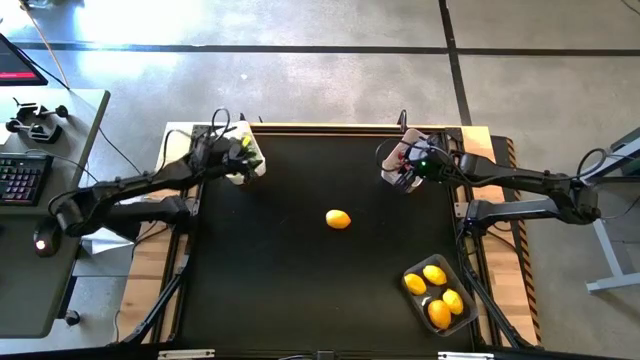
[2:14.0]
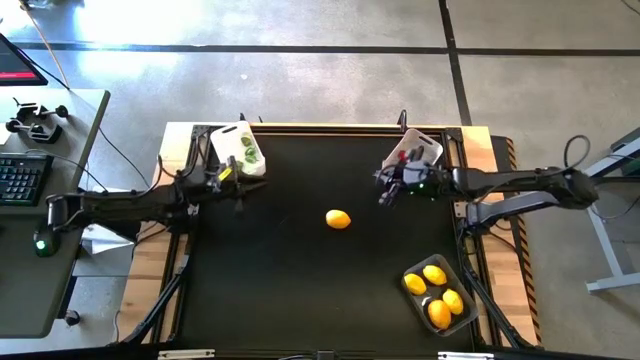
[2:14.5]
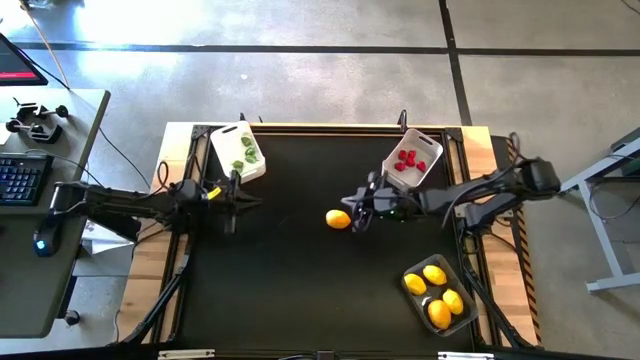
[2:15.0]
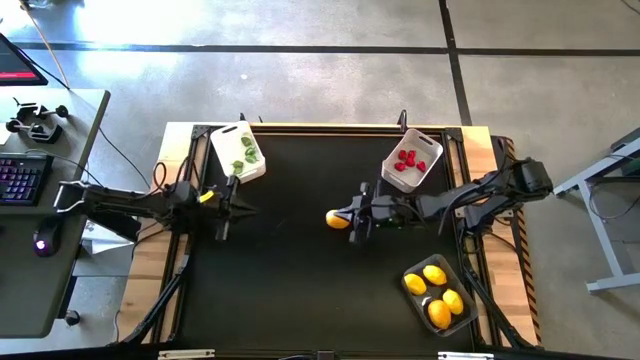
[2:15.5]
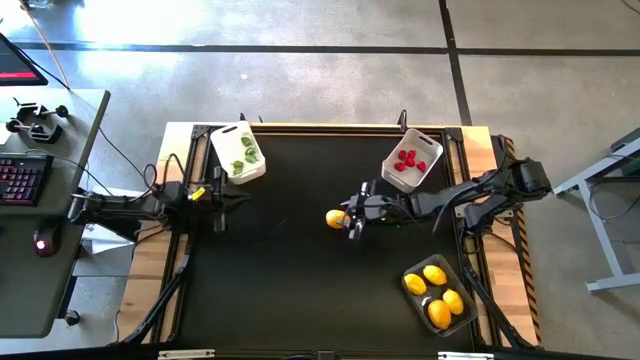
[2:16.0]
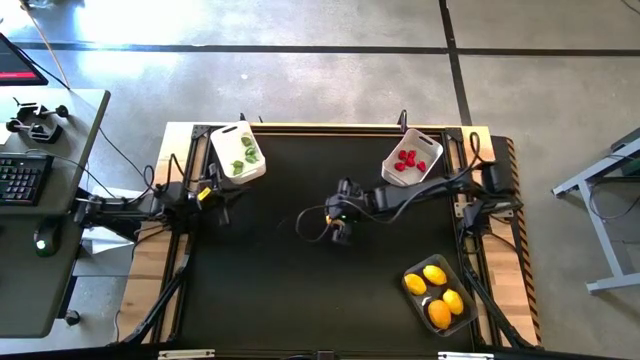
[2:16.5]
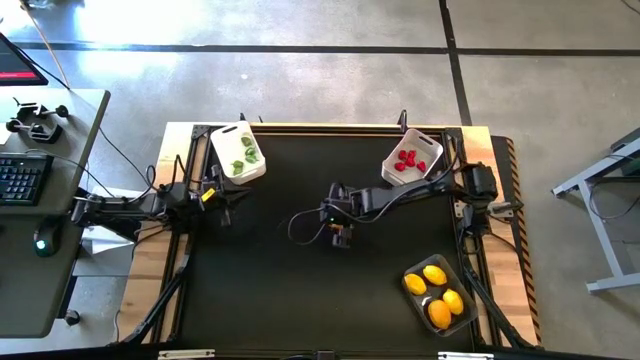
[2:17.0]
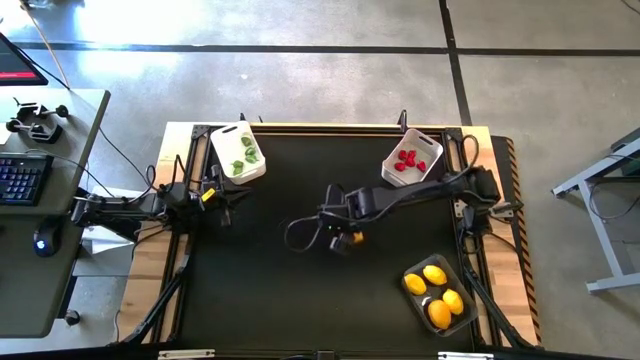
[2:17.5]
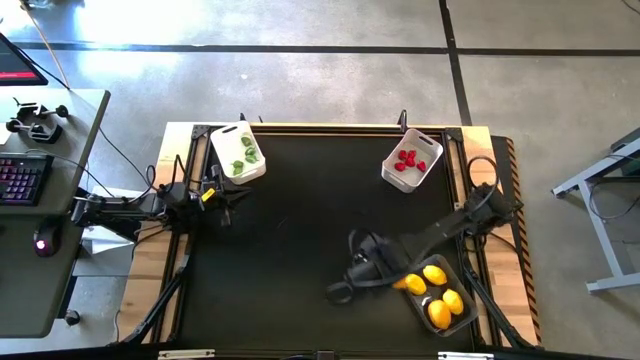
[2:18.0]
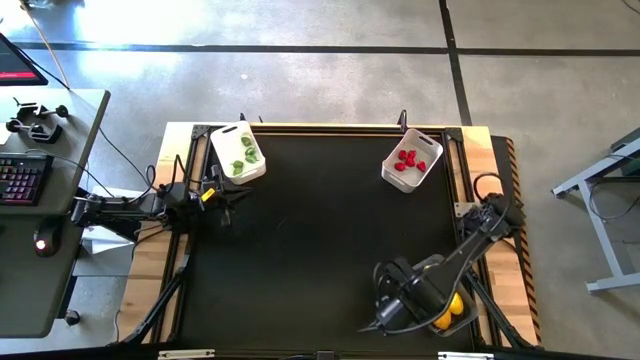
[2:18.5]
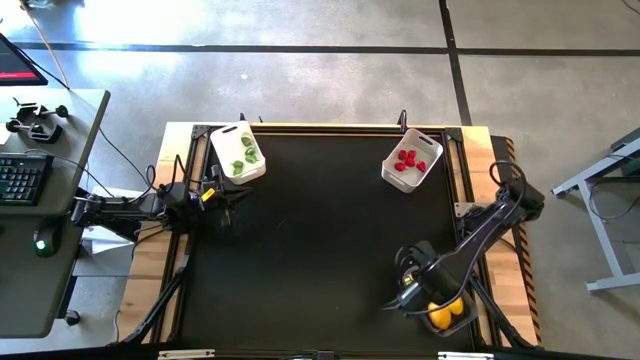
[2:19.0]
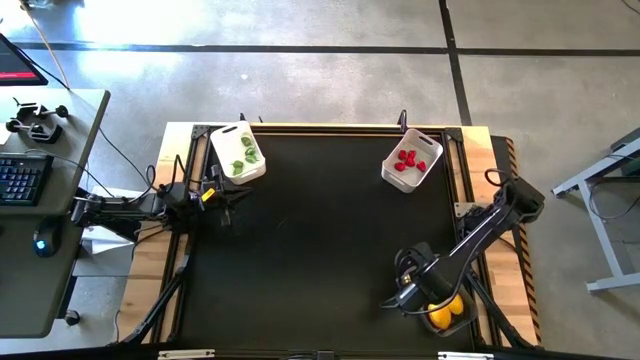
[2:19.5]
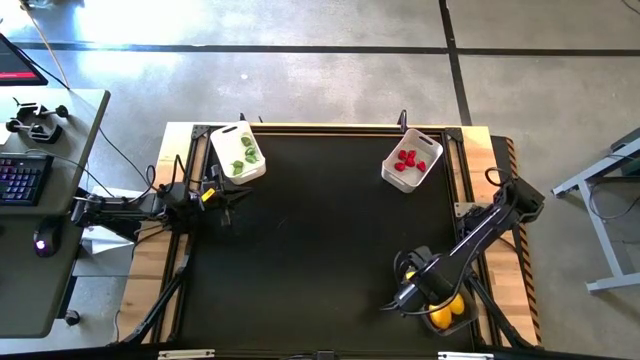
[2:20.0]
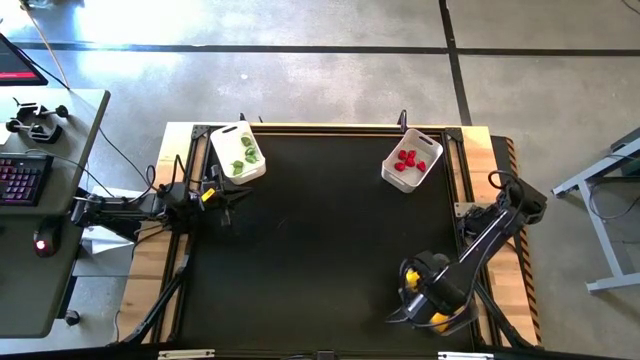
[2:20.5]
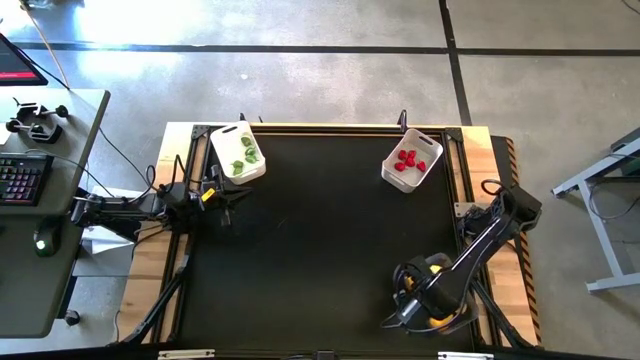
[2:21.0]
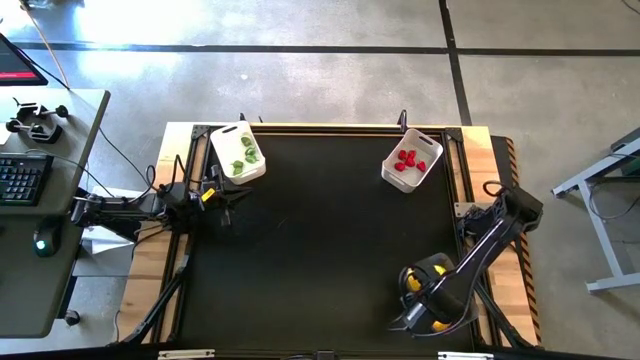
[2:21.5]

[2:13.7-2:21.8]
Task: Sort produce into baskets
Put the yellow lemon into the transparent bin

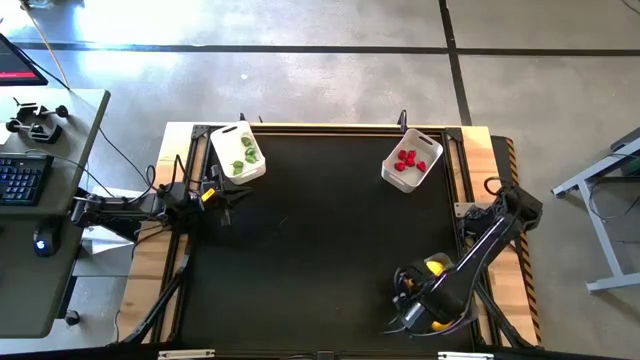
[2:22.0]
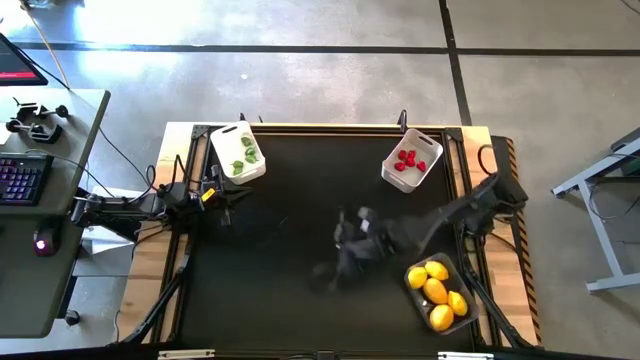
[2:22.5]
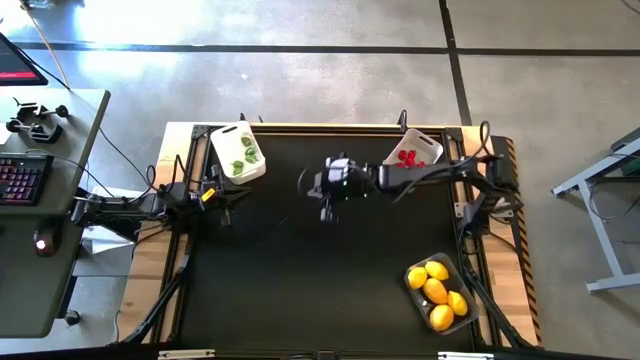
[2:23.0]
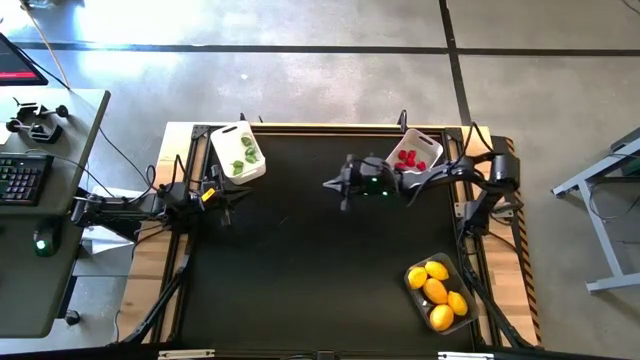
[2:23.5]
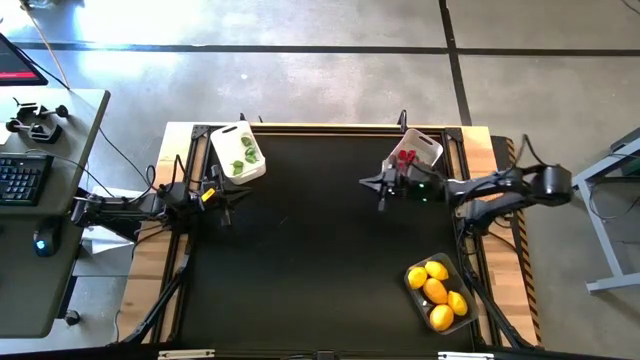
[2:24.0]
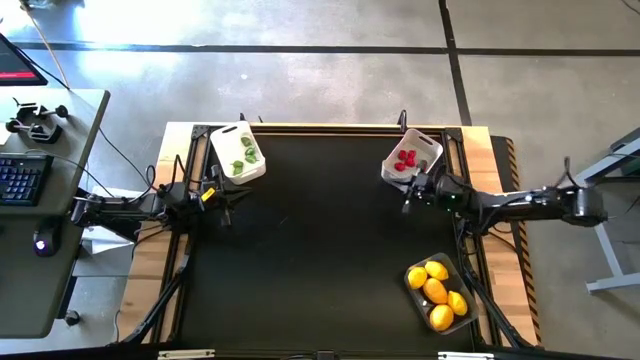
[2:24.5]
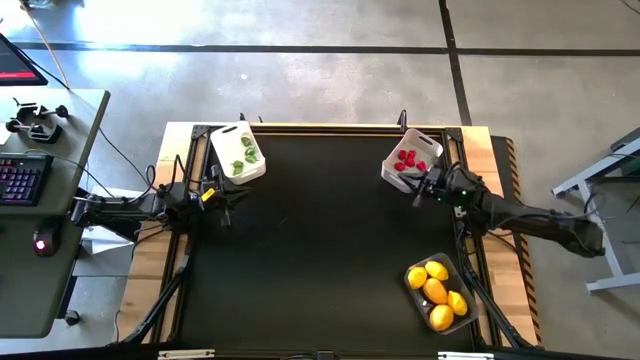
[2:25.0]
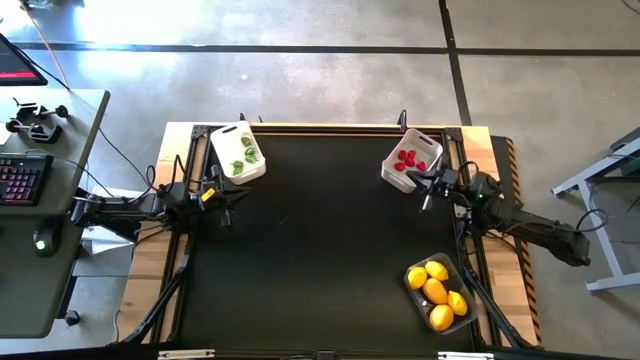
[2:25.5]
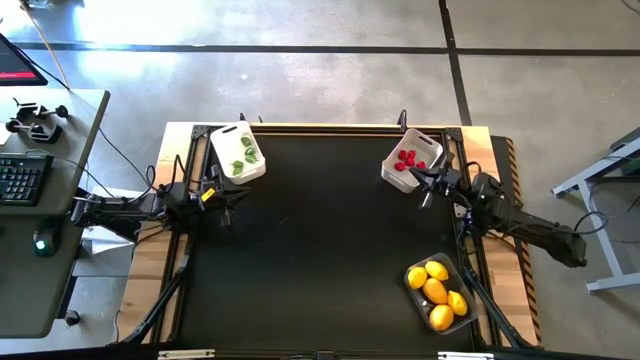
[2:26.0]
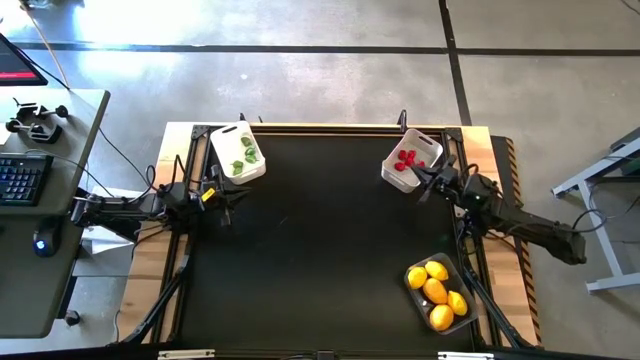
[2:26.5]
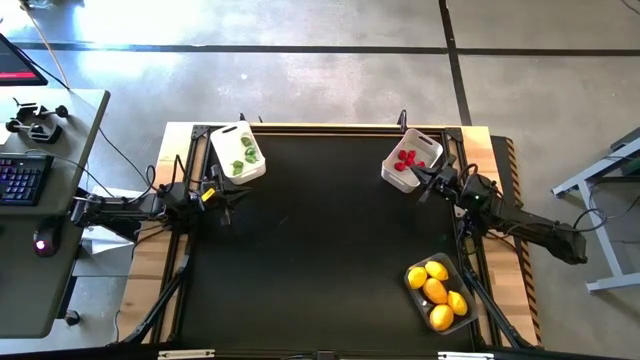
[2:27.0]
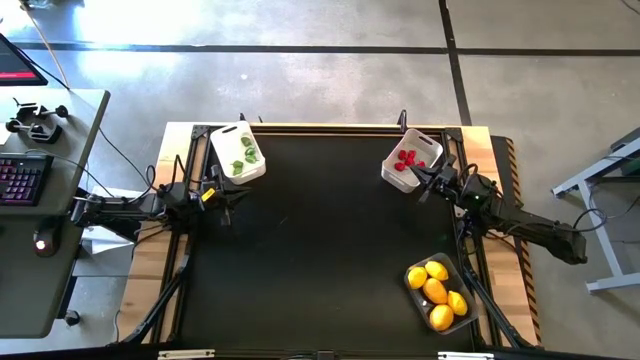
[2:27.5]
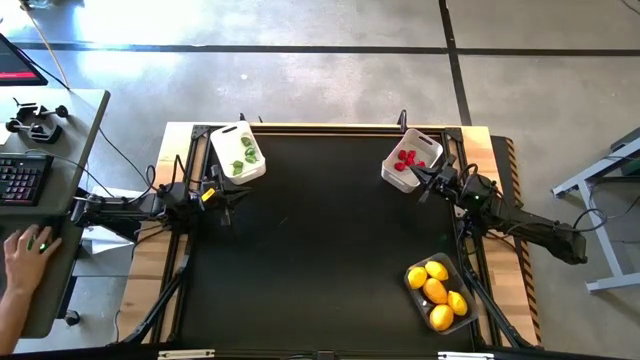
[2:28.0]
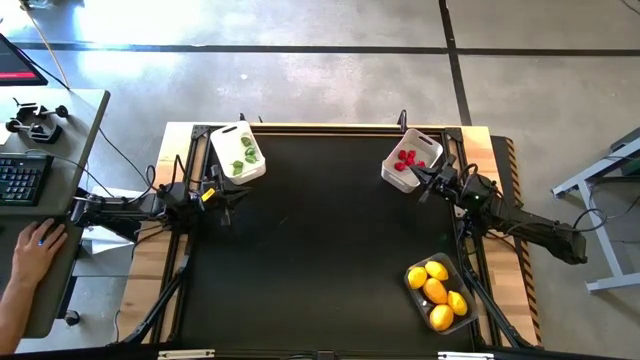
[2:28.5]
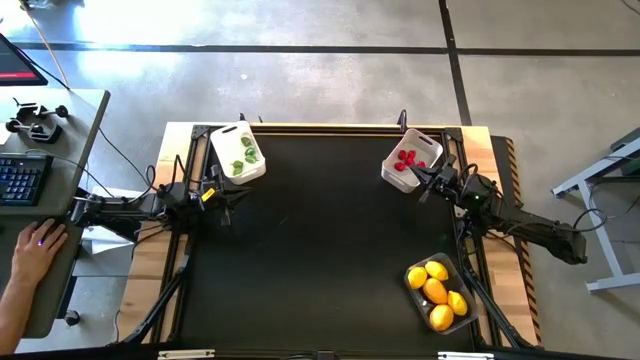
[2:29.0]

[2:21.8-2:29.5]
Return to Home Position

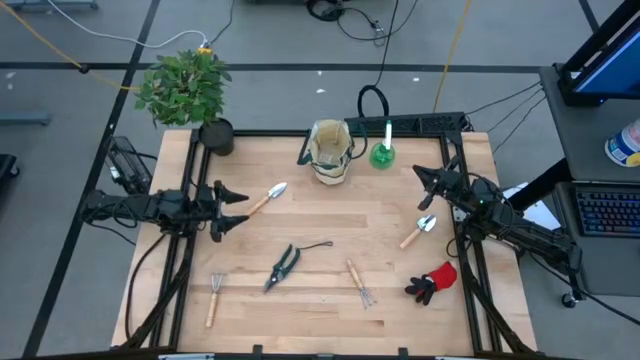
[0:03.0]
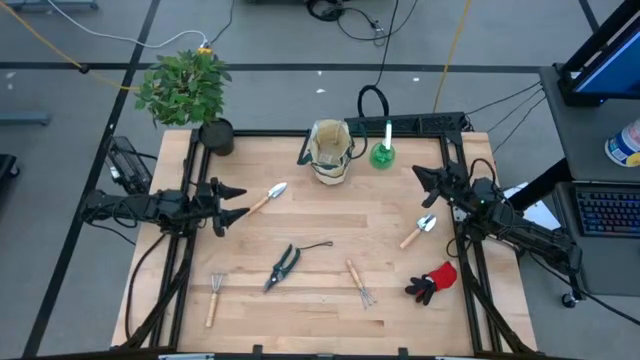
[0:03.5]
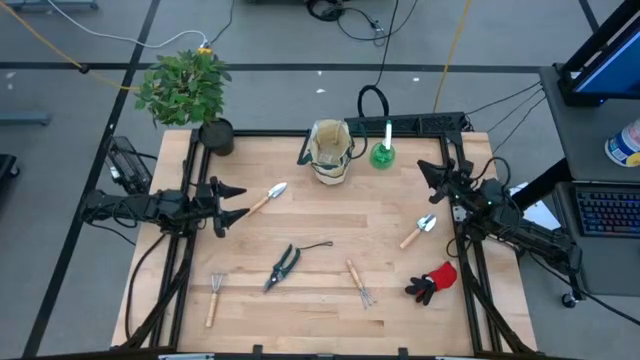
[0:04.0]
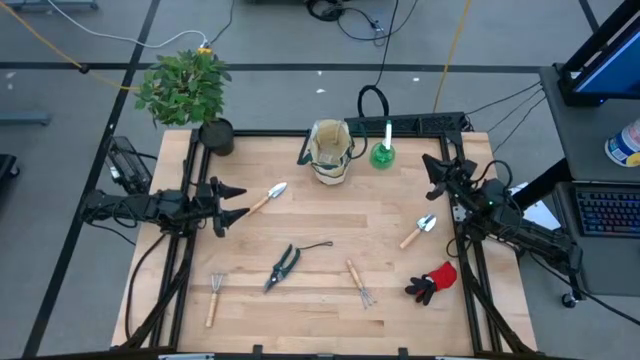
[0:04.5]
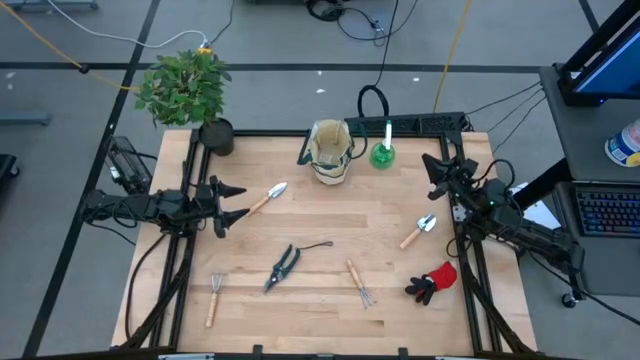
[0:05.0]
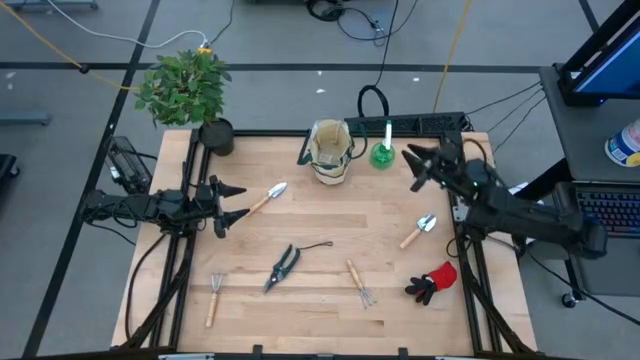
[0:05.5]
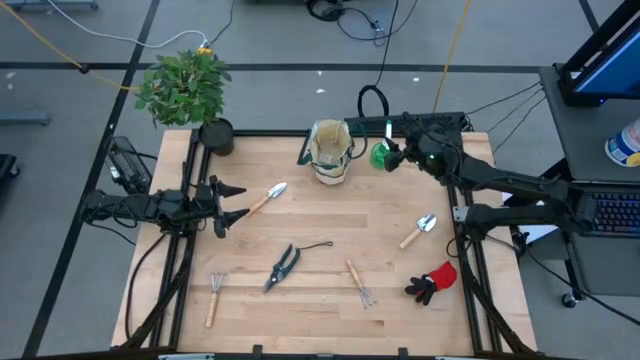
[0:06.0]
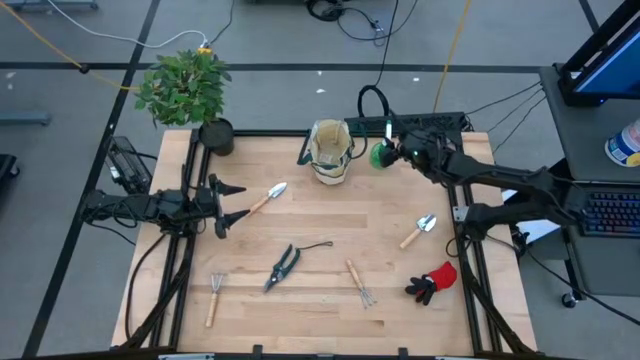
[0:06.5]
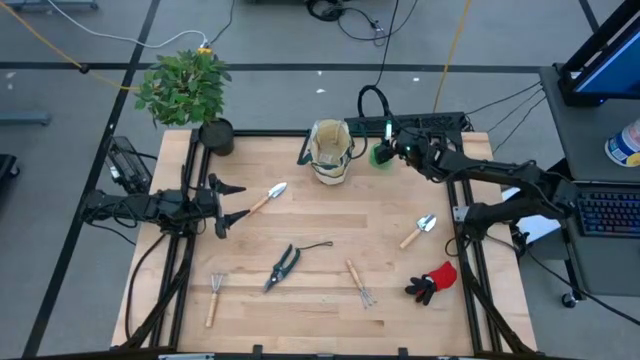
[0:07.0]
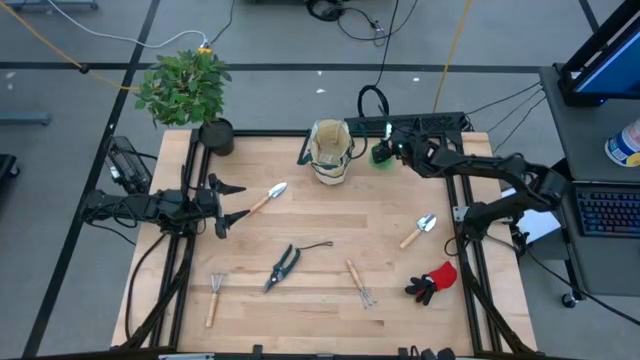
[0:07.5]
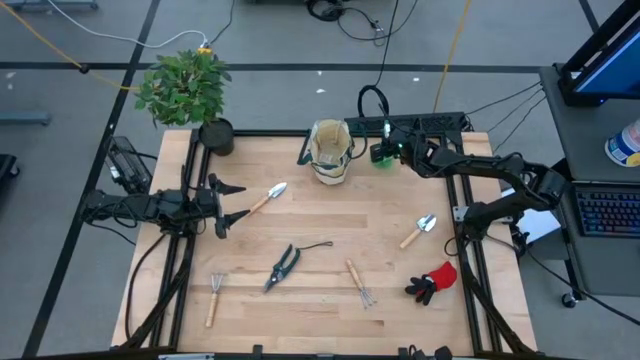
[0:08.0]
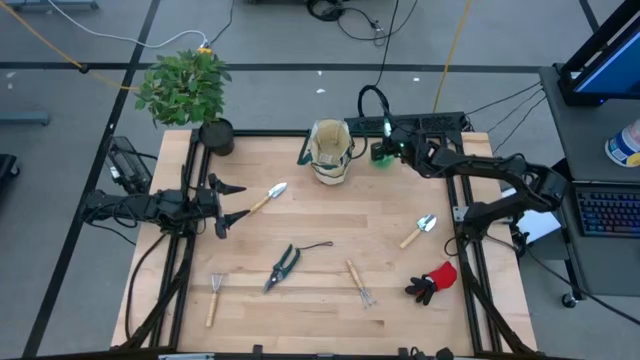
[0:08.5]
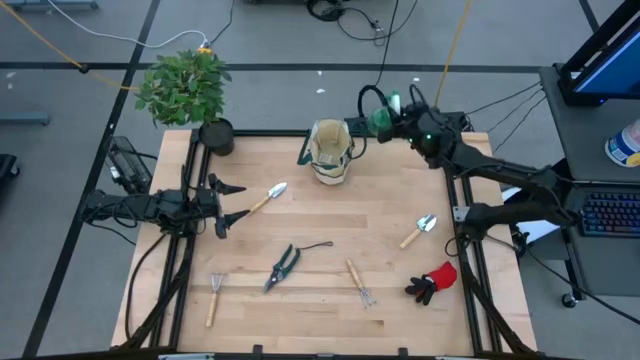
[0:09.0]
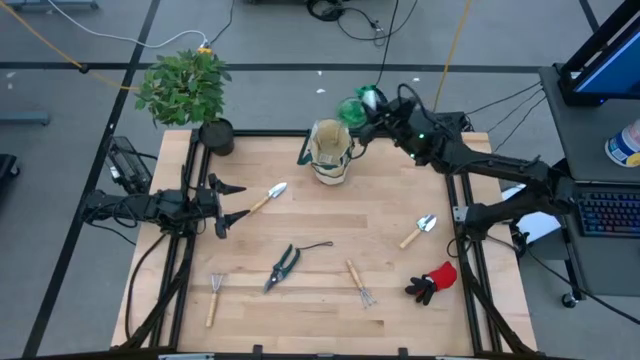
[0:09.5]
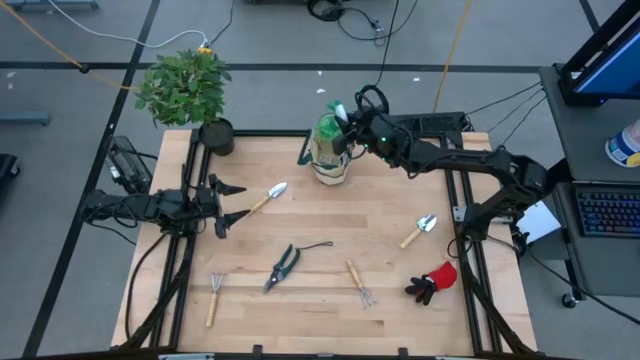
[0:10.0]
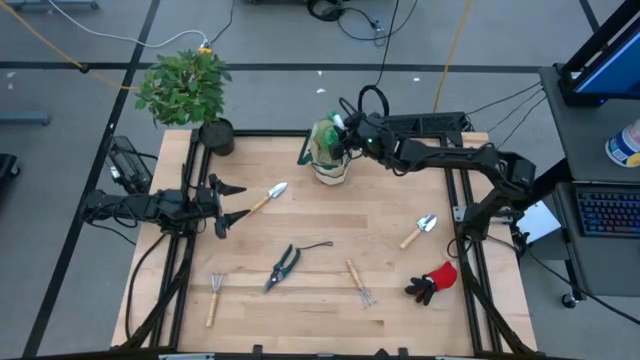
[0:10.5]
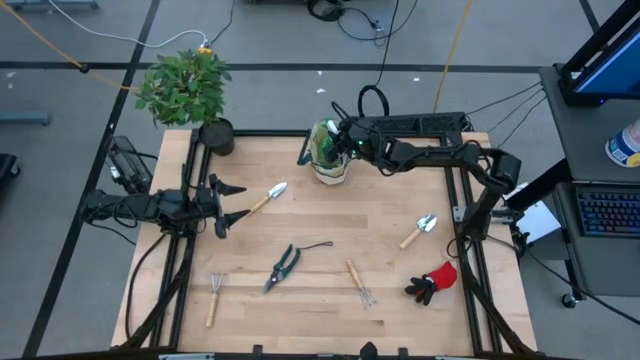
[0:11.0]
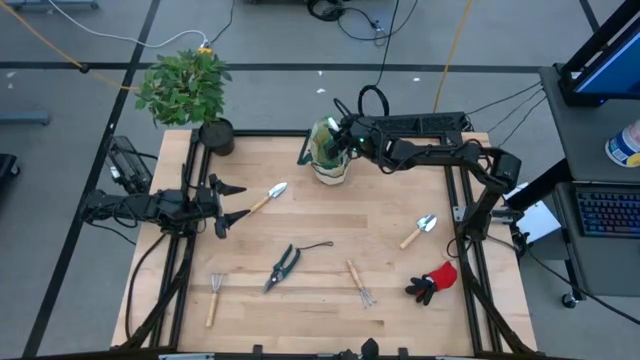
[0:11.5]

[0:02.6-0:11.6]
Task: Pick & Place Garden tools in Gardening bag
Put the green spray bottle into the brown gardening bag
